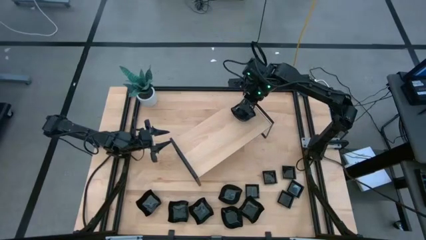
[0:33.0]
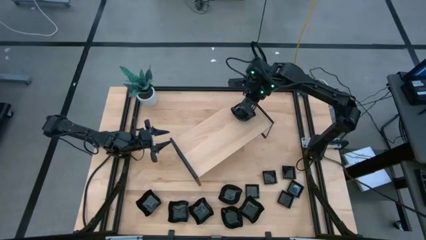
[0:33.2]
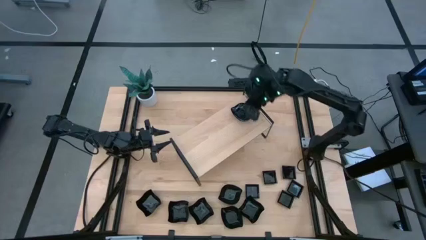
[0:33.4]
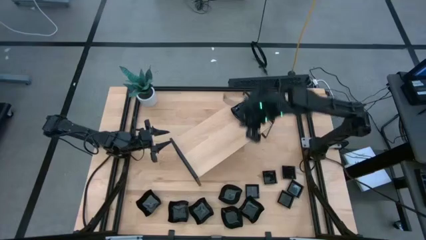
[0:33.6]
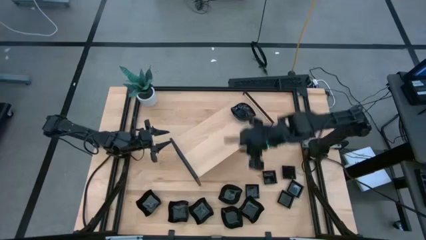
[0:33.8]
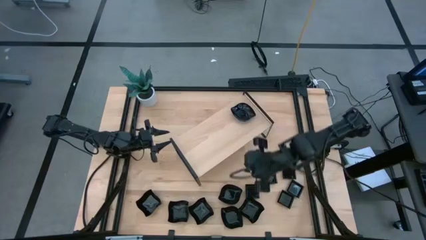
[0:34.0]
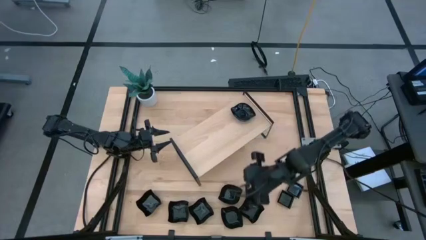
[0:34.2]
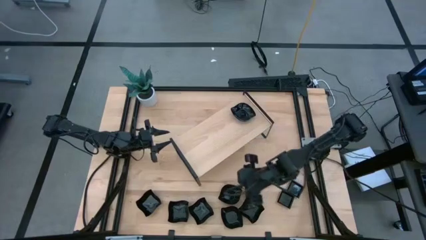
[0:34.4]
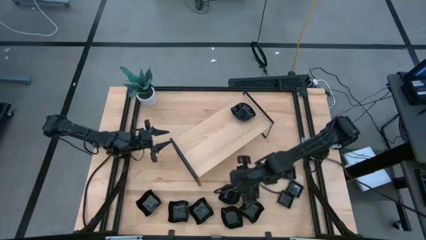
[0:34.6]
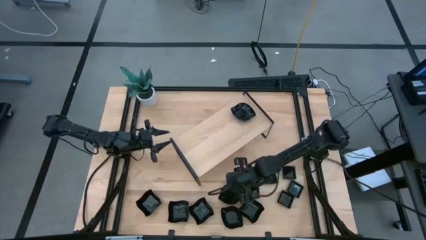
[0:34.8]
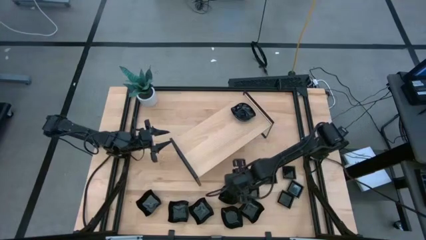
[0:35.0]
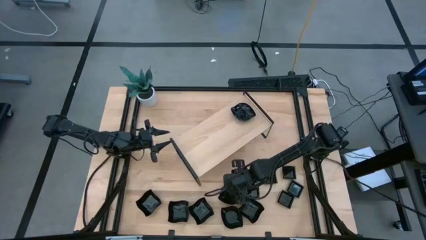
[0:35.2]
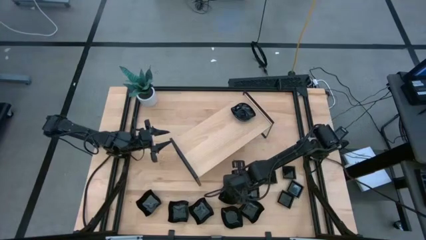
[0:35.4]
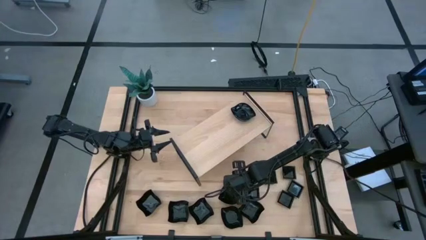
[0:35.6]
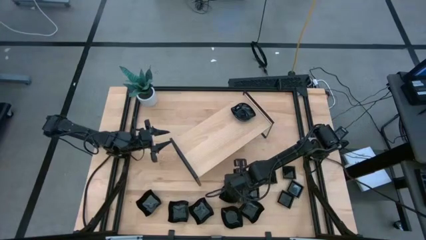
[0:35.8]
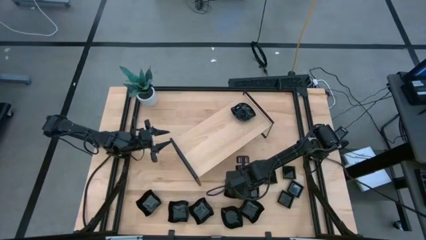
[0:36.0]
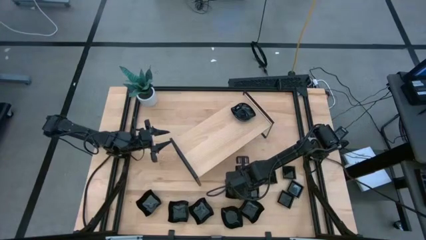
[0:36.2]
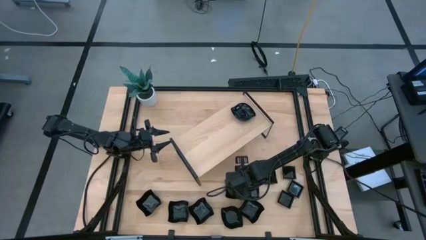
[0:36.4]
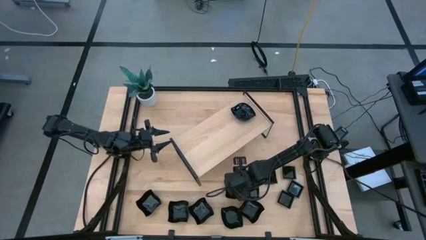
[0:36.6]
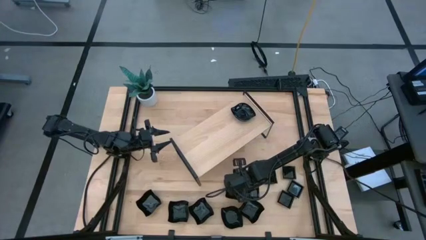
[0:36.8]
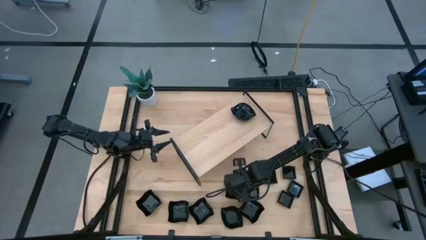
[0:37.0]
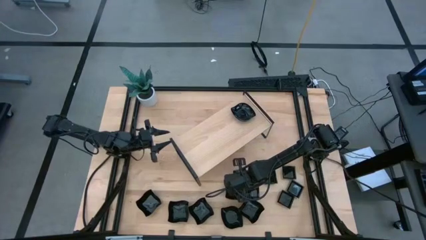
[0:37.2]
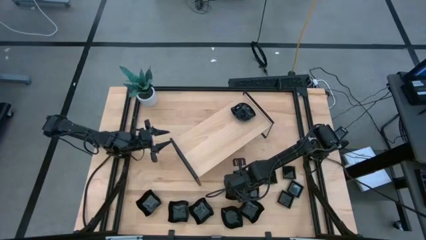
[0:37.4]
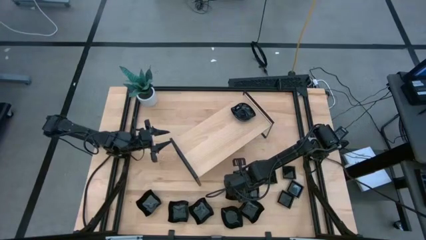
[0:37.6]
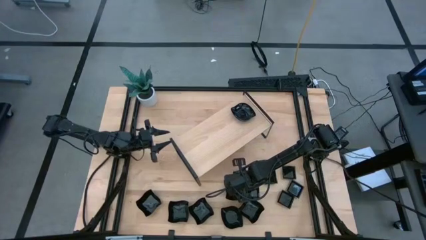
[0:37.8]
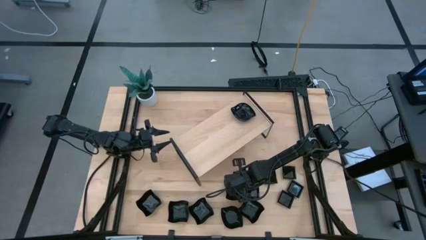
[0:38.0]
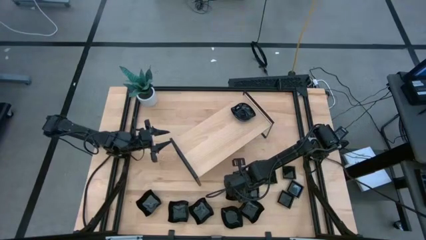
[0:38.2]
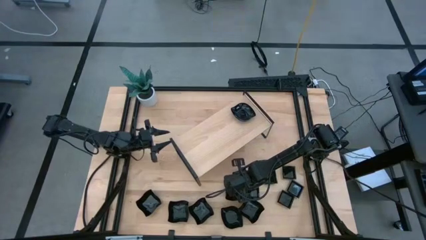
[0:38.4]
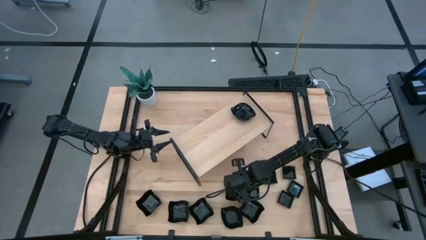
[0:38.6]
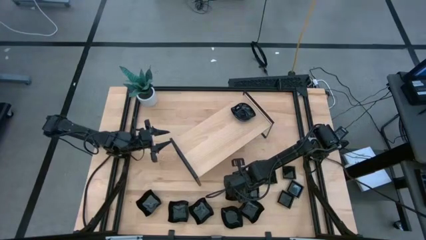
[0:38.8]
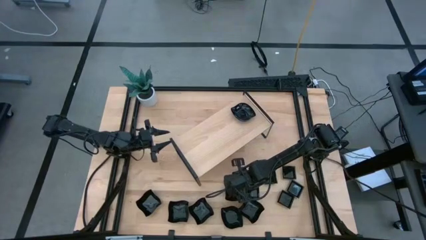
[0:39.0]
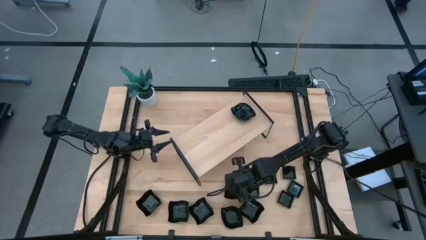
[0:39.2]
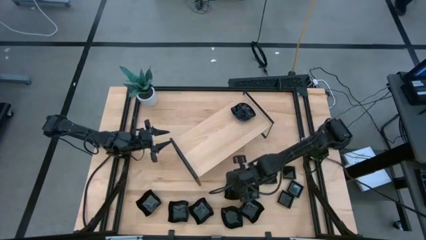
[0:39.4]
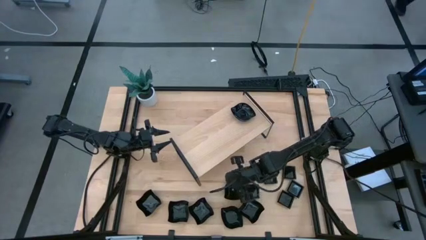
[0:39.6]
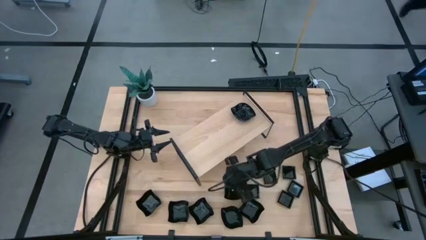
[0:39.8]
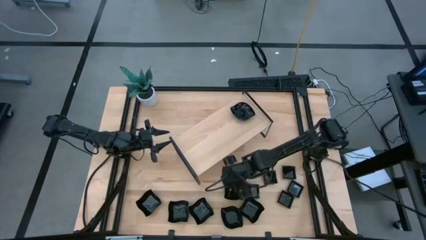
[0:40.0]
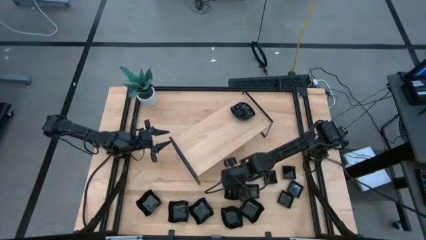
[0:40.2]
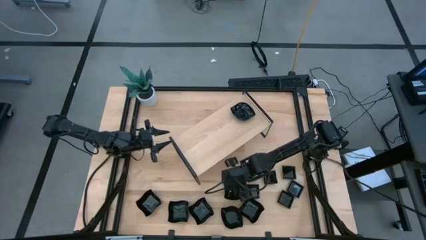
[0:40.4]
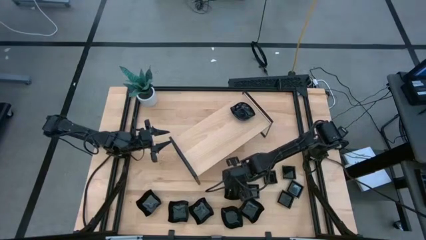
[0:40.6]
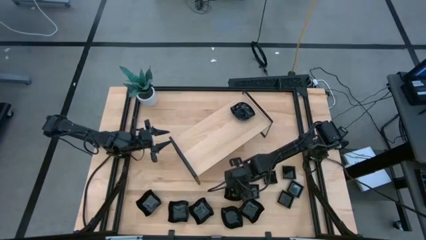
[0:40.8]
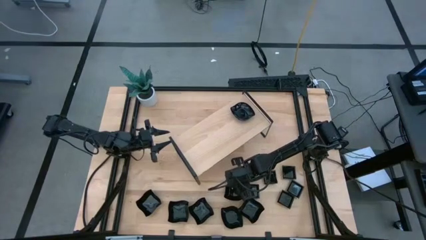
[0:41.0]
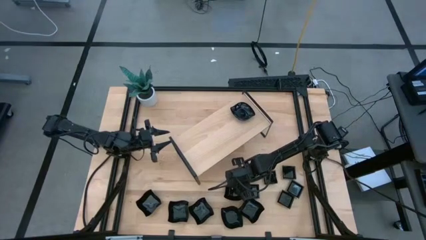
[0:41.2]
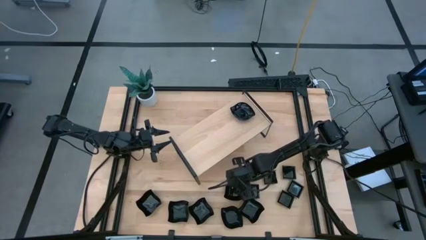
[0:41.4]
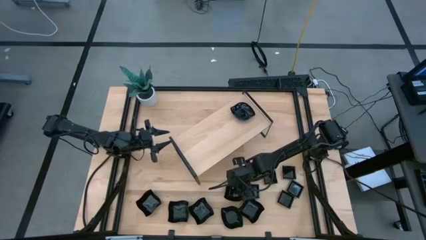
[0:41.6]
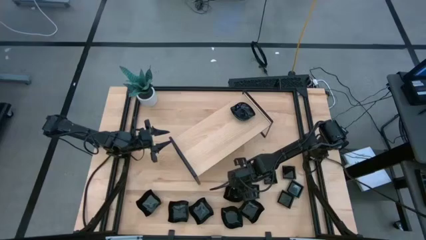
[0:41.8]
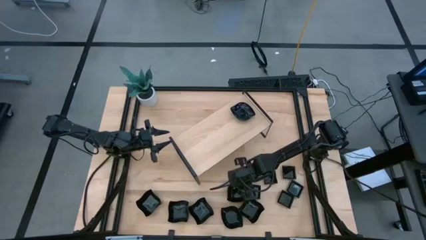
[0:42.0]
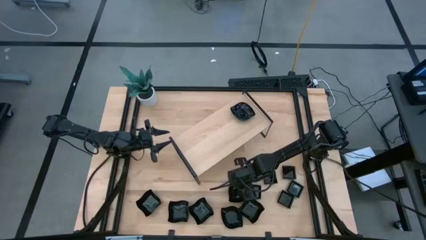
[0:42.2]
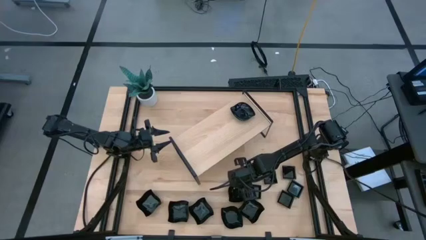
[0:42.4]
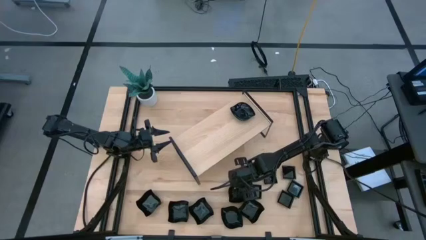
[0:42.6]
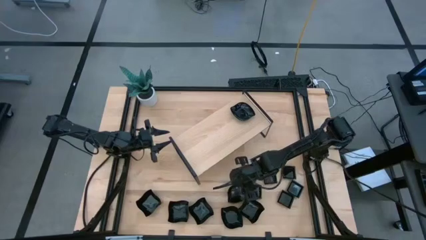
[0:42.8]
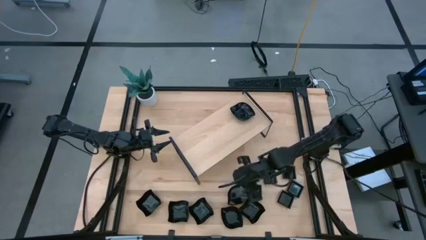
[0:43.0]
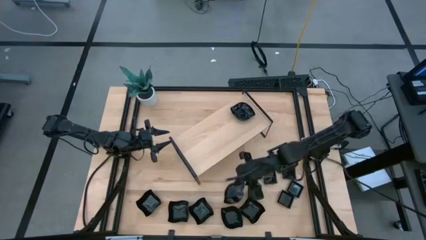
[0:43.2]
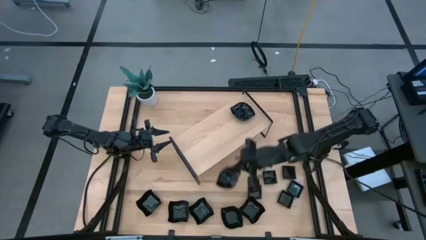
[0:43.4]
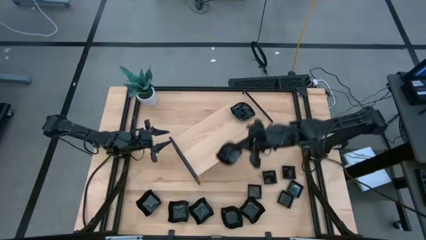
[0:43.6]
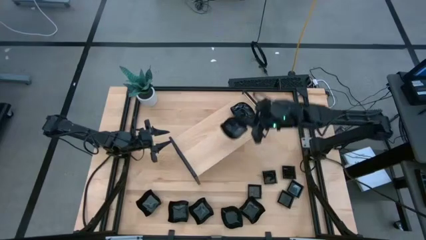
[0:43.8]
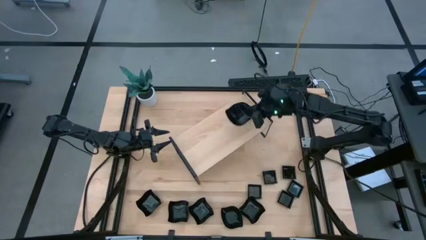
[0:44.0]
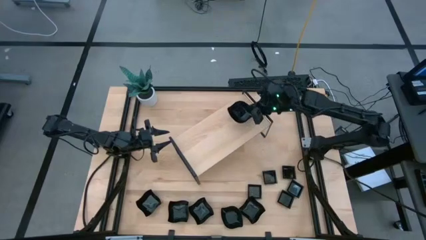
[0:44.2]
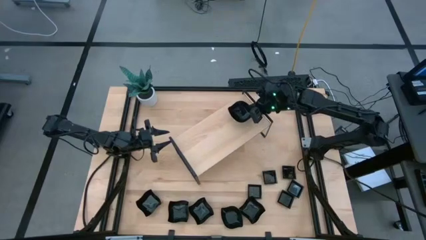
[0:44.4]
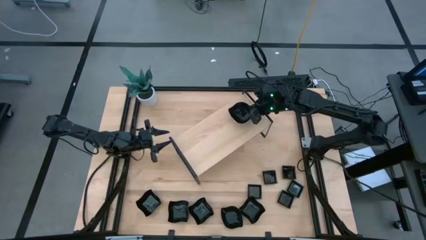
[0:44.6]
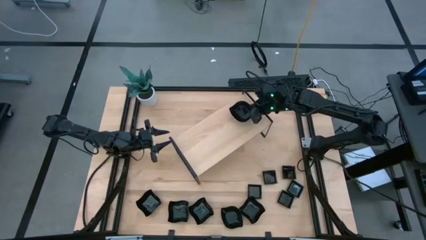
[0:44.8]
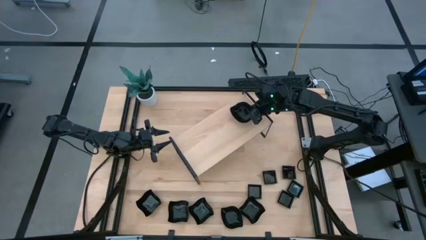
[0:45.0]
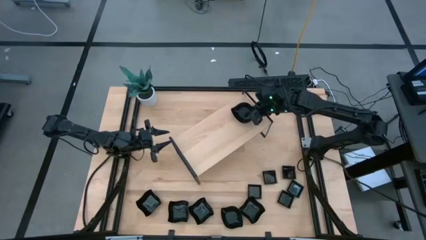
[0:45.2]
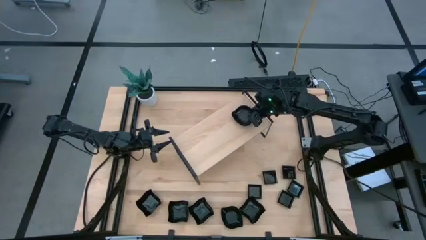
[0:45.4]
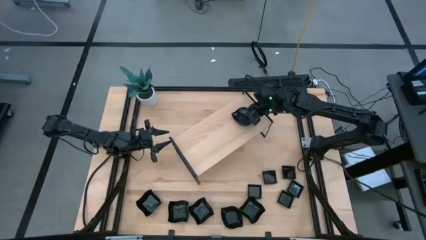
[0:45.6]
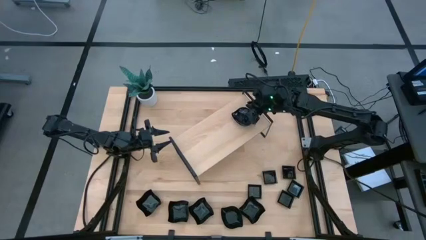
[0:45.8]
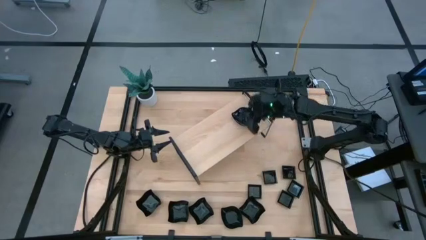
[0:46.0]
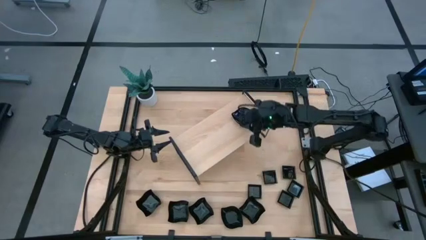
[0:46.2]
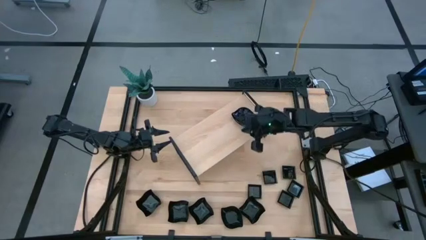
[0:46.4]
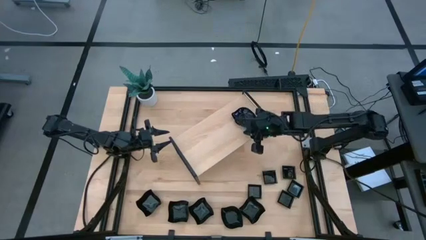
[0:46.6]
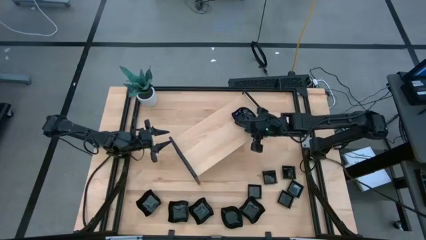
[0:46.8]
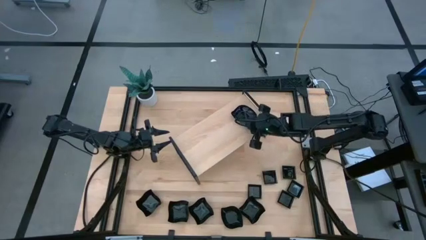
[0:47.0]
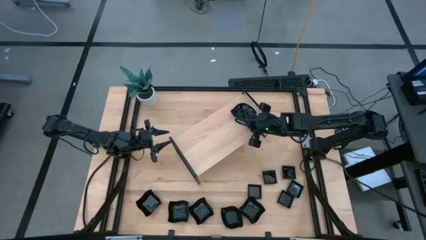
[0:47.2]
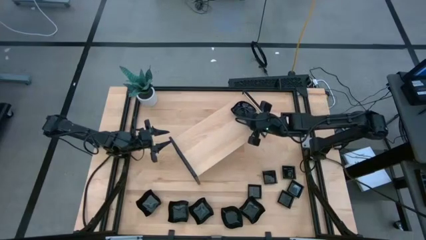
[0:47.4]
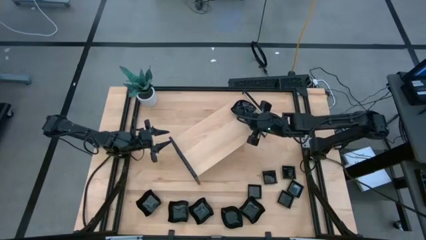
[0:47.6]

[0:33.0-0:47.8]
Task: Pick & Place Mini shaped plates
Stack the leaf shaped plate on top of the other leaf shaped plates on the shelf

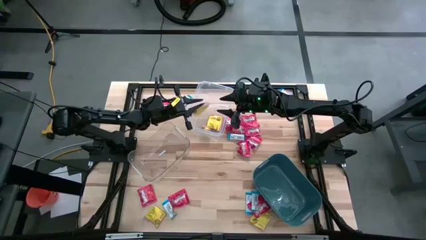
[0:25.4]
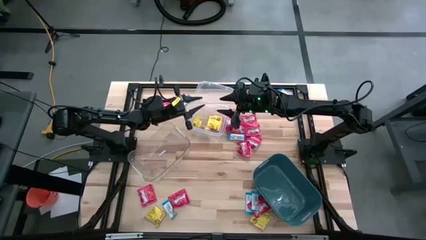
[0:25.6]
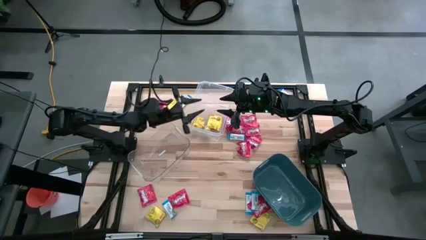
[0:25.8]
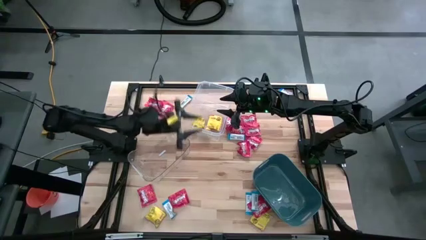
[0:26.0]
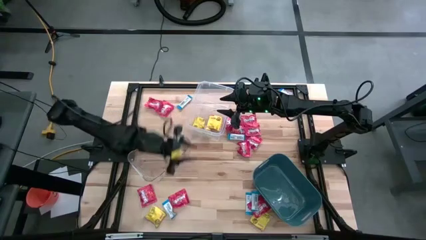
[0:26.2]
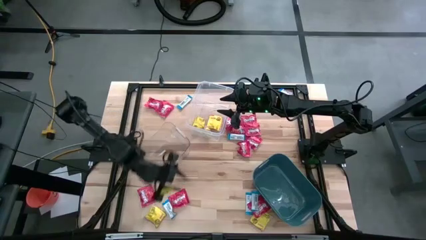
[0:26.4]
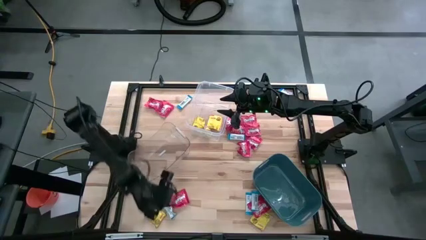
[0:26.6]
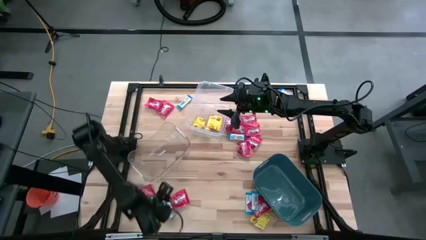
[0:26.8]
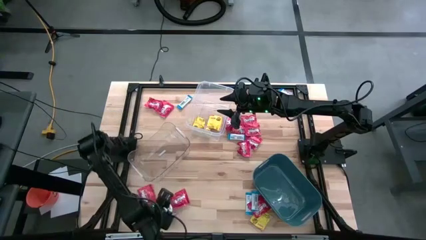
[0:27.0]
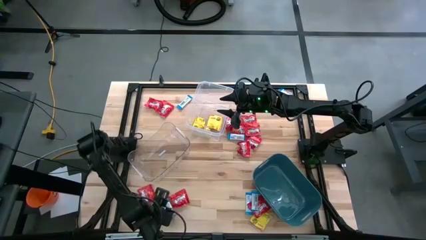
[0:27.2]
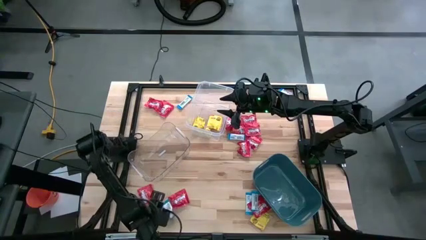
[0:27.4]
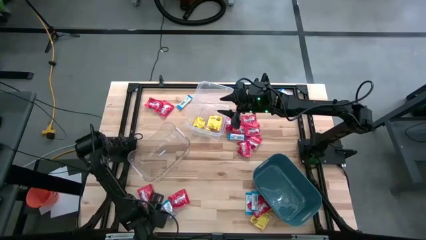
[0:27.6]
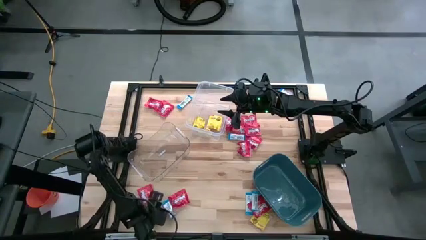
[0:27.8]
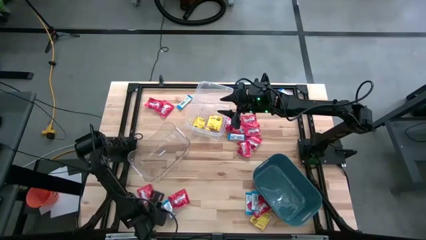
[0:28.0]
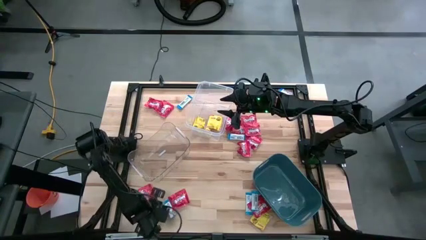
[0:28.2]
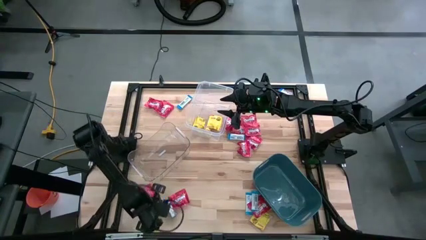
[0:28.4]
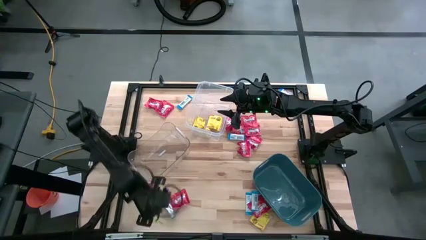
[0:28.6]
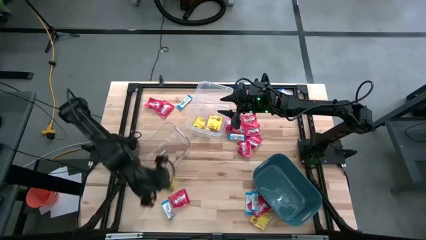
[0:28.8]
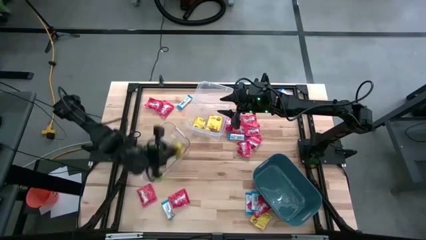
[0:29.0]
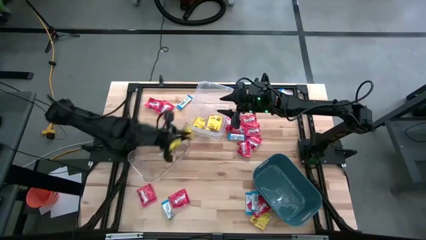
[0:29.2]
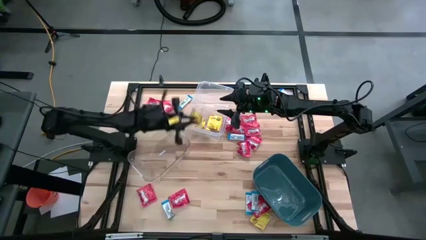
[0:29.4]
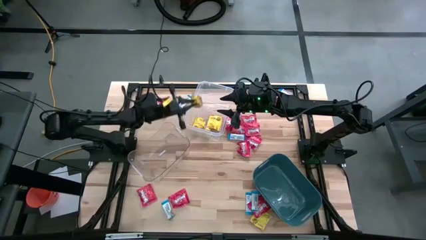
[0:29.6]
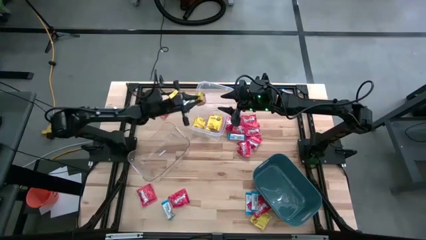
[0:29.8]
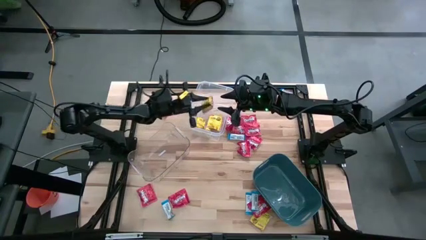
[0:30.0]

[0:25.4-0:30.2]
Task: Sort candy
Put the yellow candy into the transparent container
